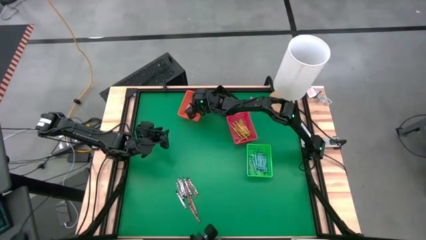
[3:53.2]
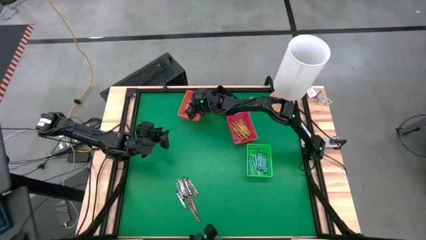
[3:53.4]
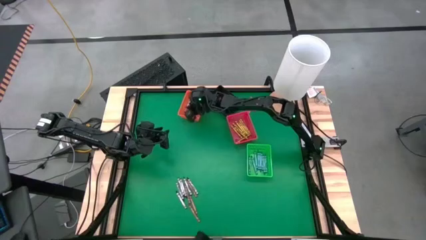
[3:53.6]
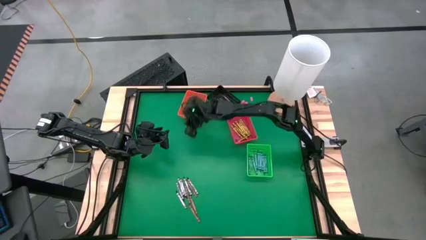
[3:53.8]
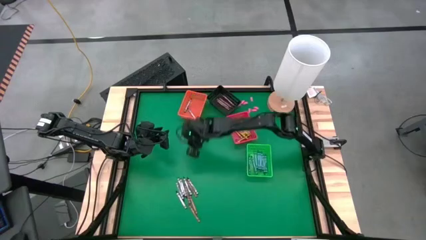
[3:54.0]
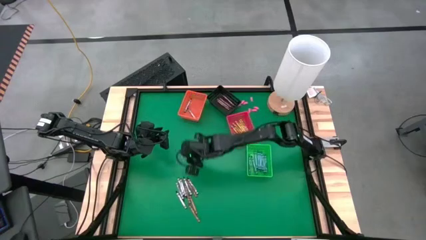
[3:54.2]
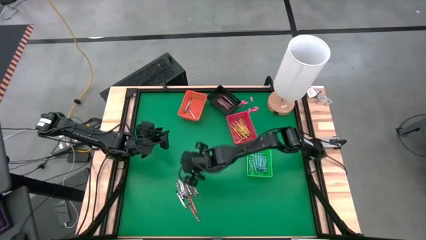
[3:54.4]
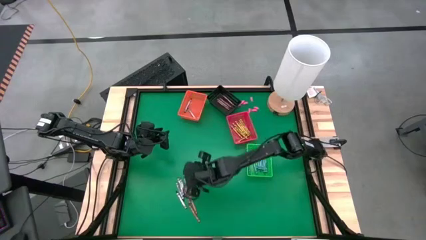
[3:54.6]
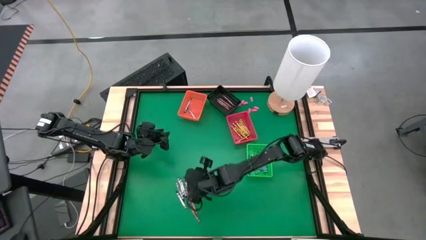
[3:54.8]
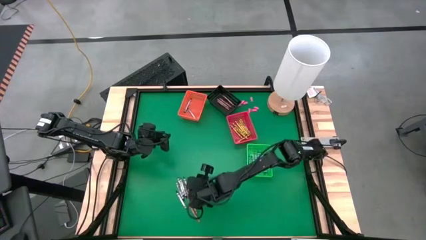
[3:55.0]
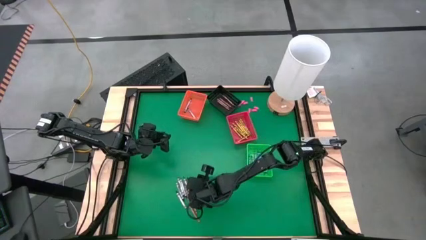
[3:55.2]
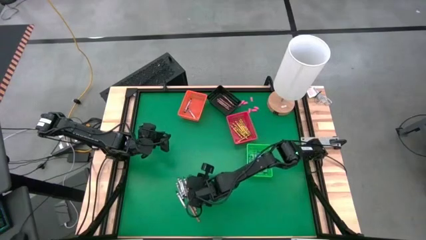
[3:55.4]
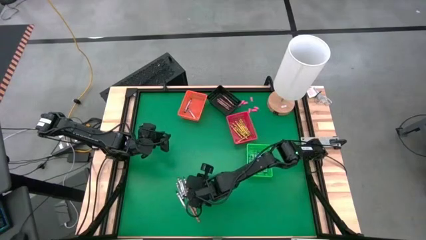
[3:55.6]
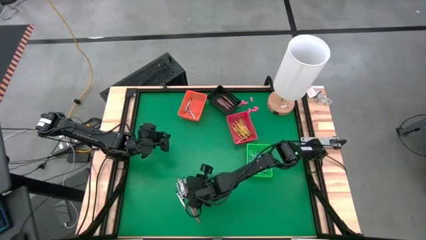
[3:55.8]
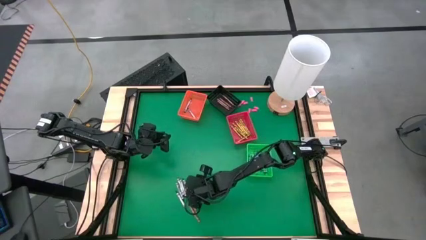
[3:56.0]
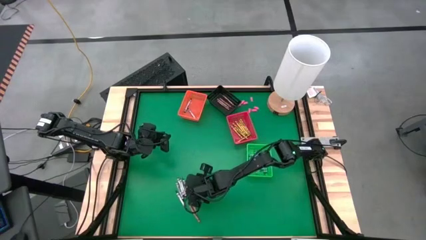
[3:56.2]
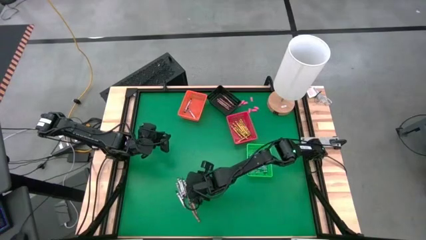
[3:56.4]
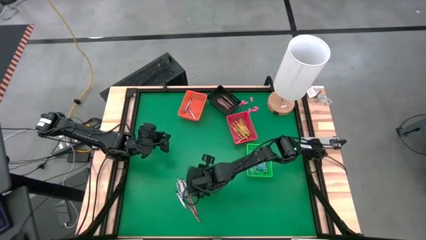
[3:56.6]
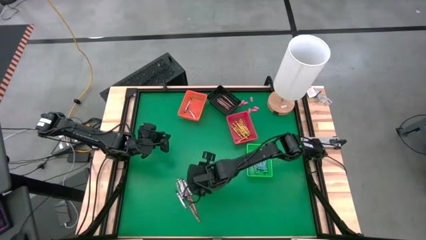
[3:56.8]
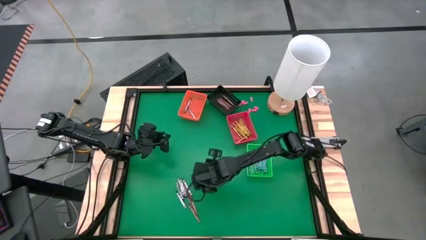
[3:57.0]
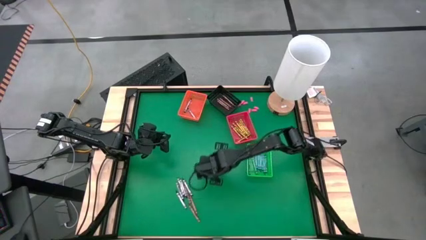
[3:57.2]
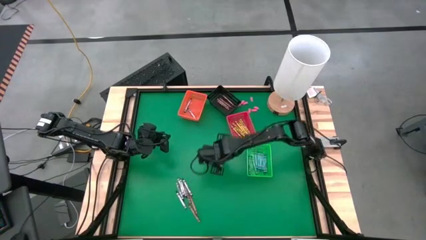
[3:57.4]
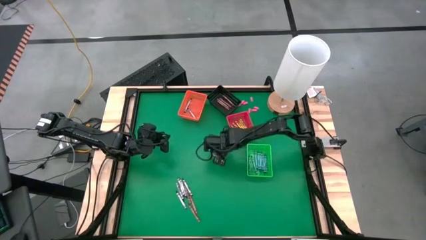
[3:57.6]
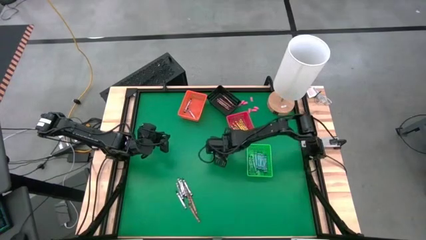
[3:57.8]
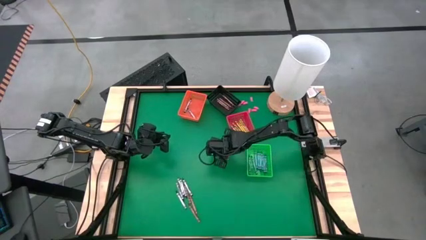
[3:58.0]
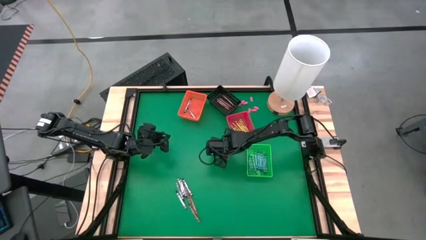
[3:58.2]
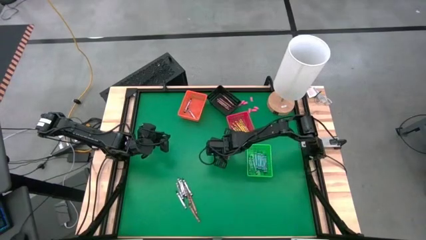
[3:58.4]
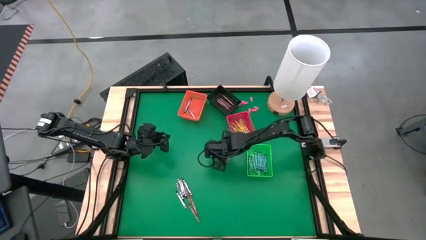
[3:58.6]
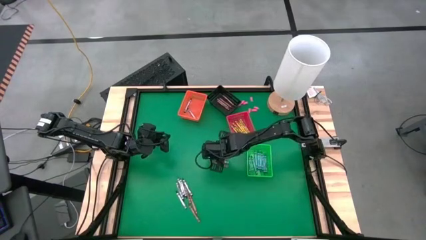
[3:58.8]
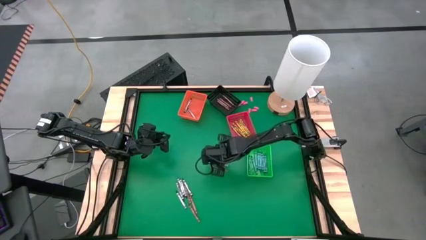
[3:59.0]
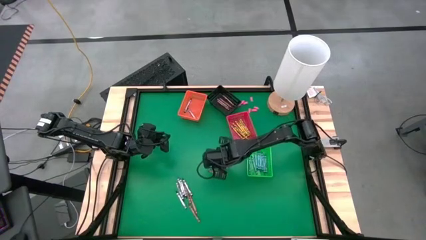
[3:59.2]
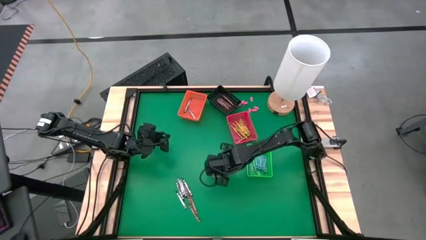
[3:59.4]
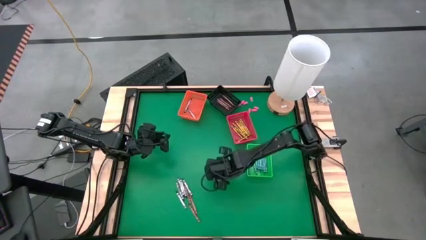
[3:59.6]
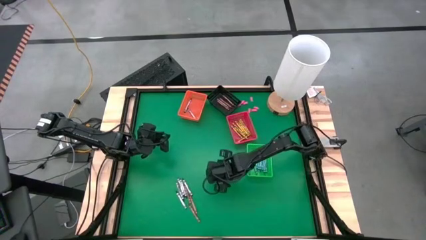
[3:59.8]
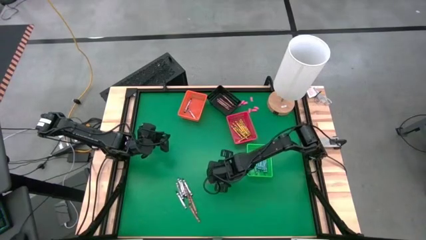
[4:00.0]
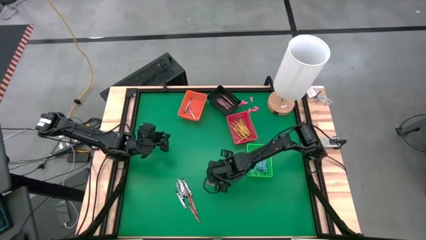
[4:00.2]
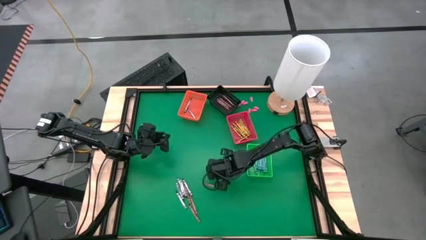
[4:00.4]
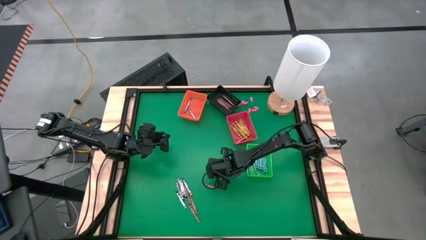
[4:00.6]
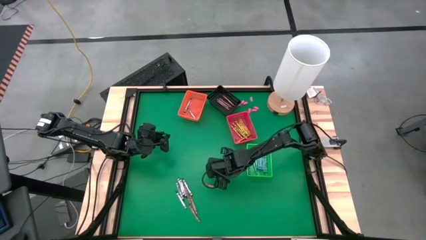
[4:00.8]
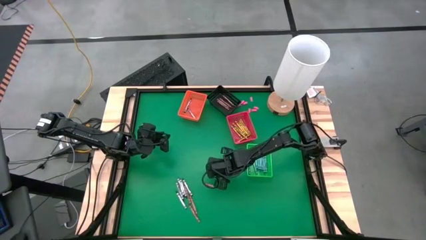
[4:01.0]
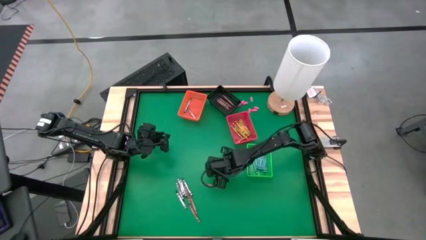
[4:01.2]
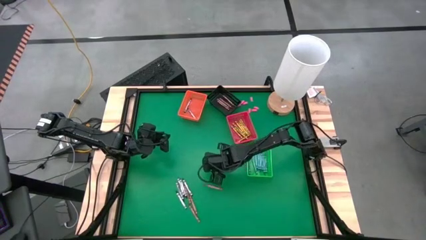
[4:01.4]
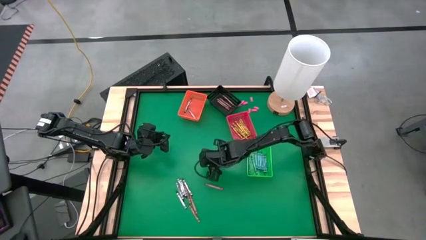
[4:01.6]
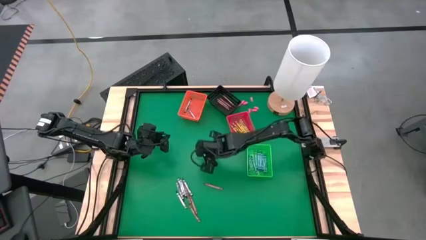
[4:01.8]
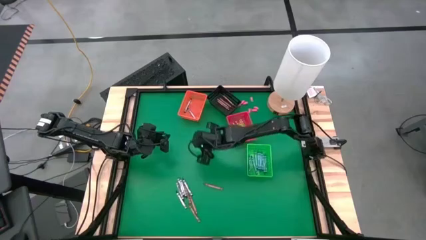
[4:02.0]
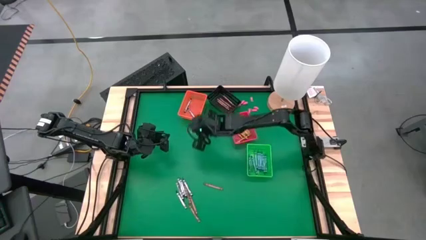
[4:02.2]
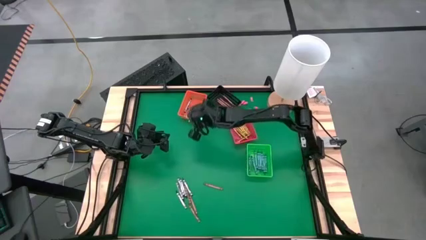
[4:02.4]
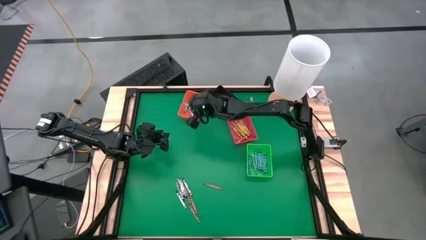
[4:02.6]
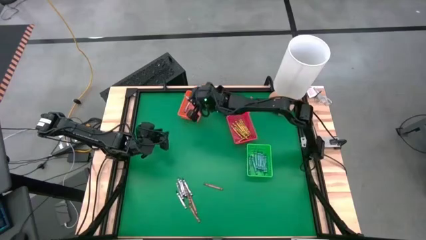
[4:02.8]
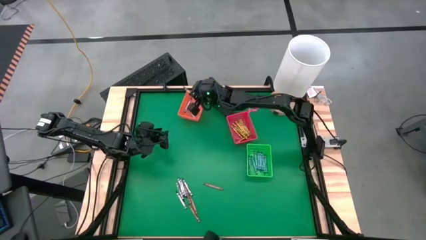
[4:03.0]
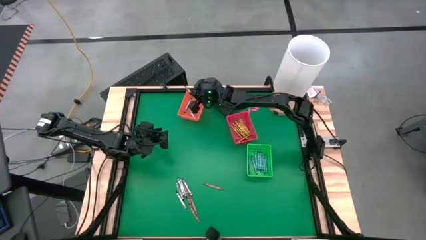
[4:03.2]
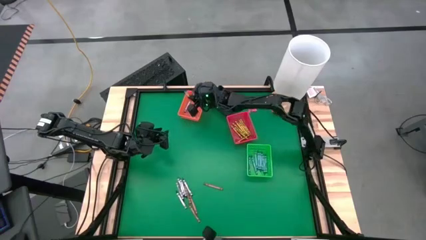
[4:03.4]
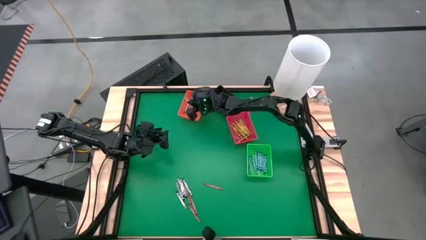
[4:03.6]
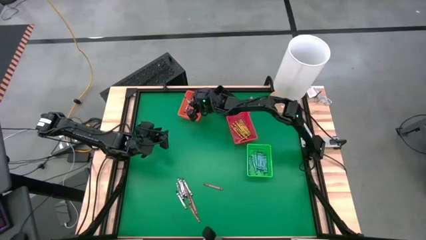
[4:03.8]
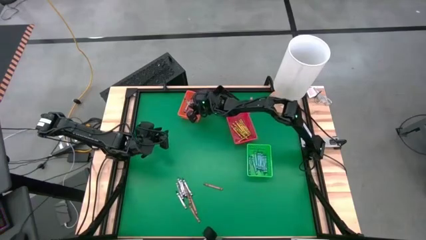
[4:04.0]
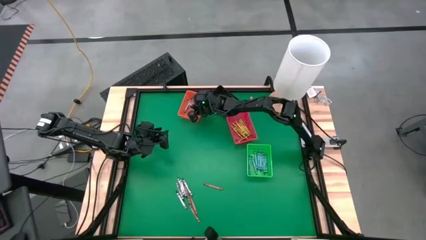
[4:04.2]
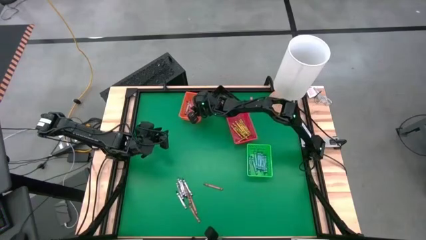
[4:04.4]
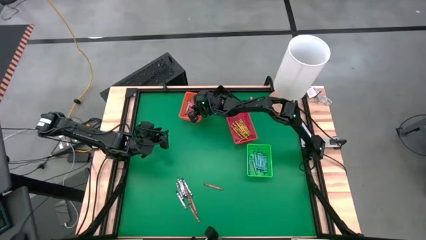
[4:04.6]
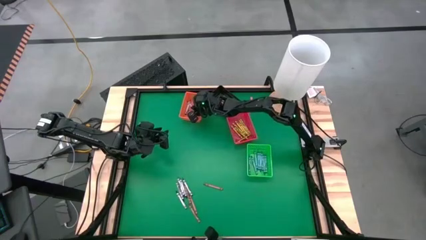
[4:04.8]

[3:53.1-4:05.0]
Task: Sort crayons
Put the black crayon into the orange bin
